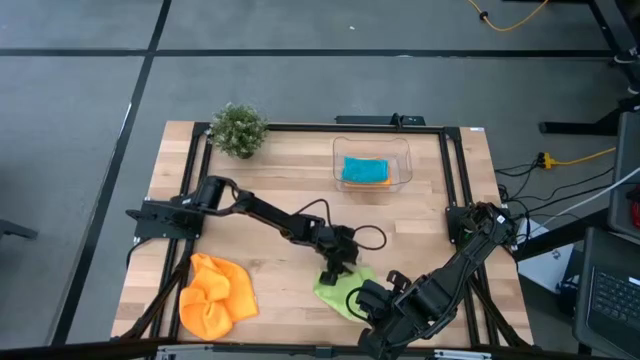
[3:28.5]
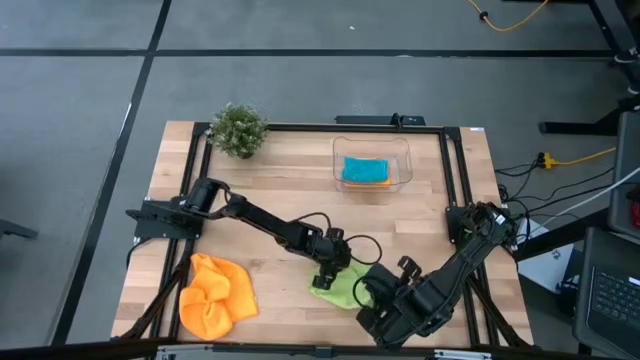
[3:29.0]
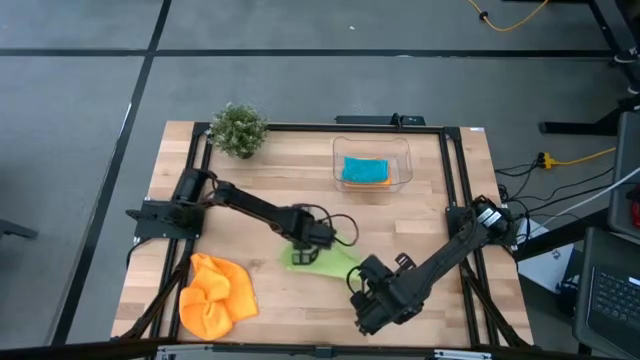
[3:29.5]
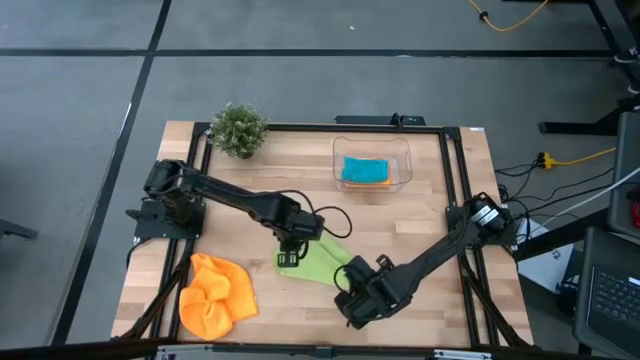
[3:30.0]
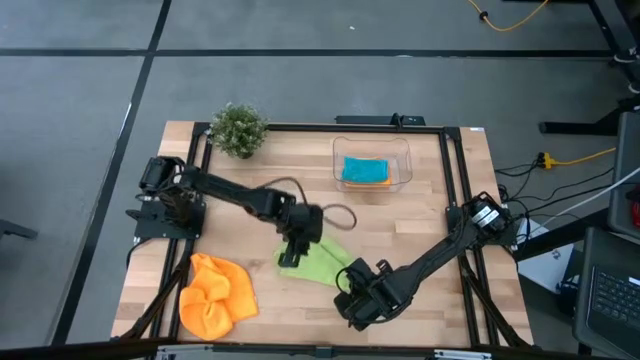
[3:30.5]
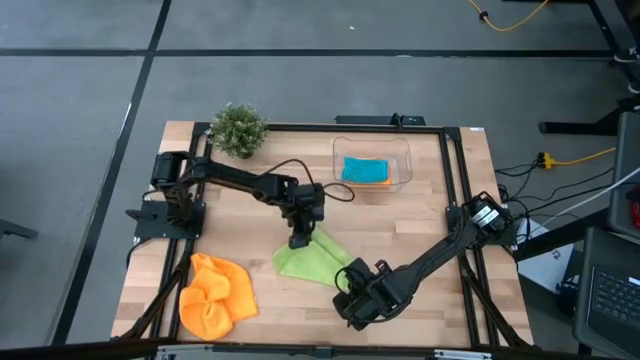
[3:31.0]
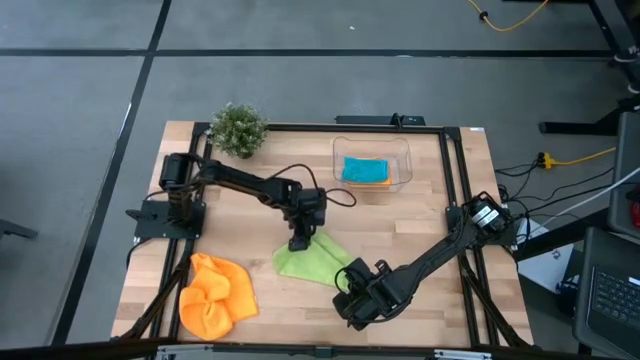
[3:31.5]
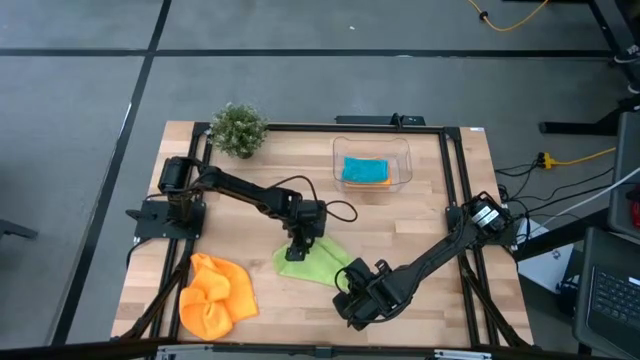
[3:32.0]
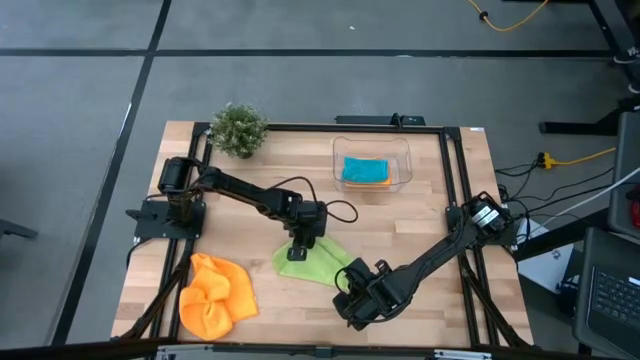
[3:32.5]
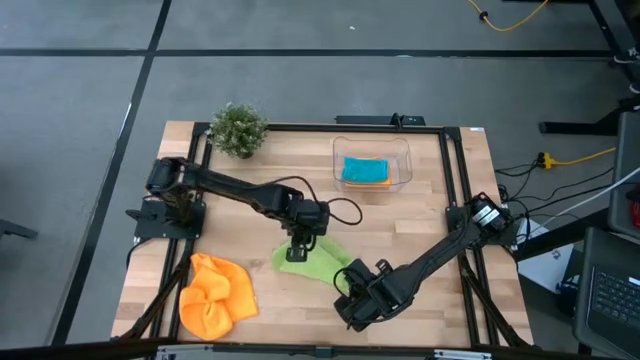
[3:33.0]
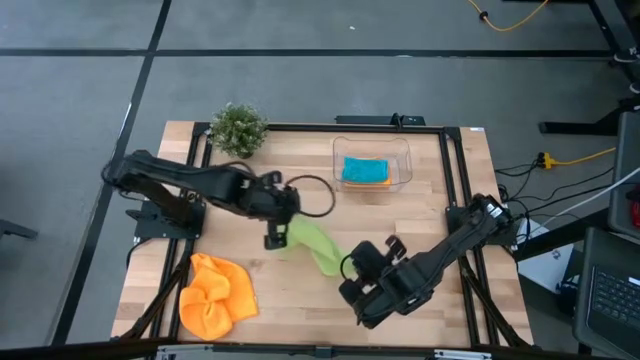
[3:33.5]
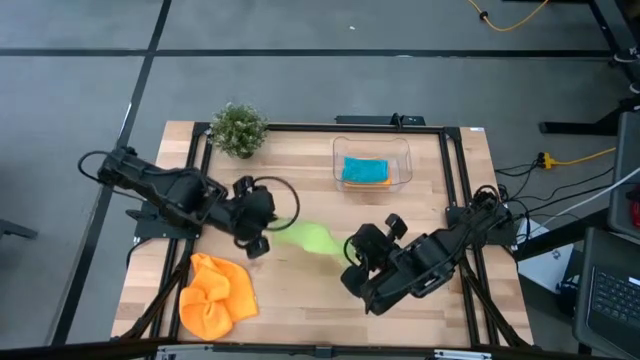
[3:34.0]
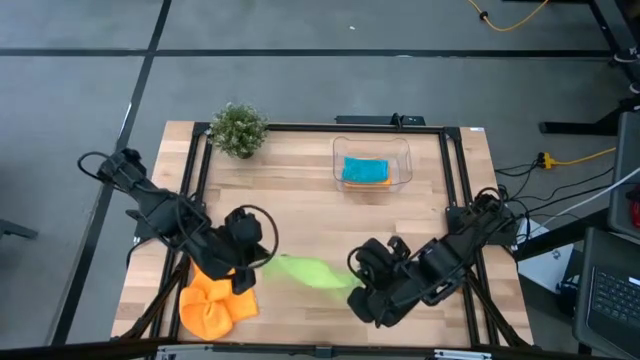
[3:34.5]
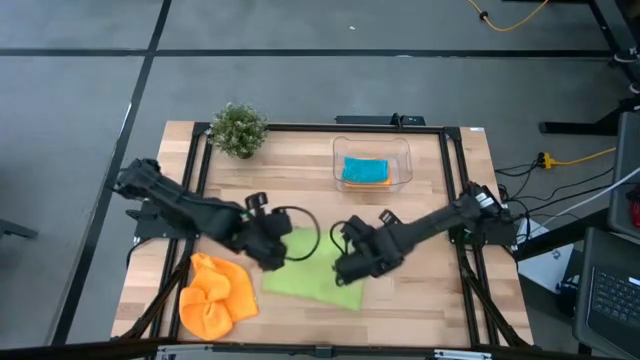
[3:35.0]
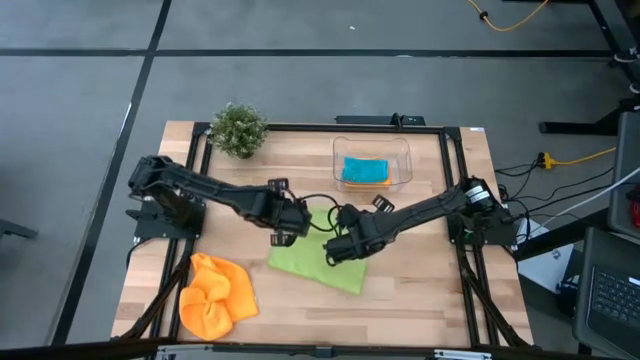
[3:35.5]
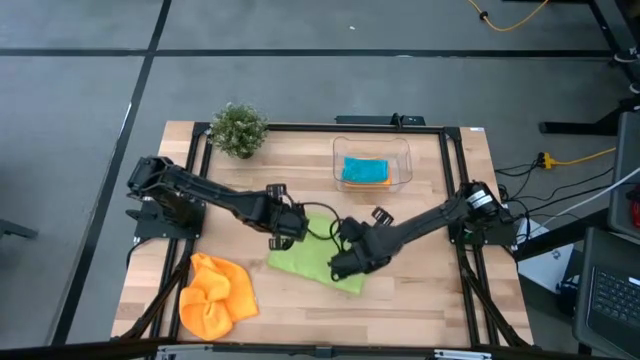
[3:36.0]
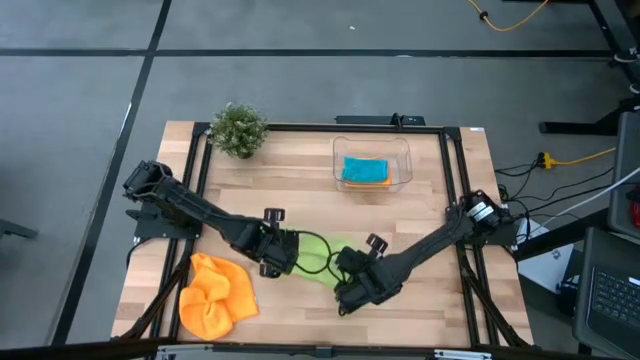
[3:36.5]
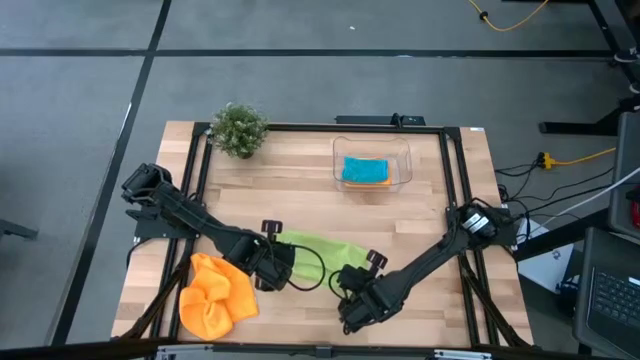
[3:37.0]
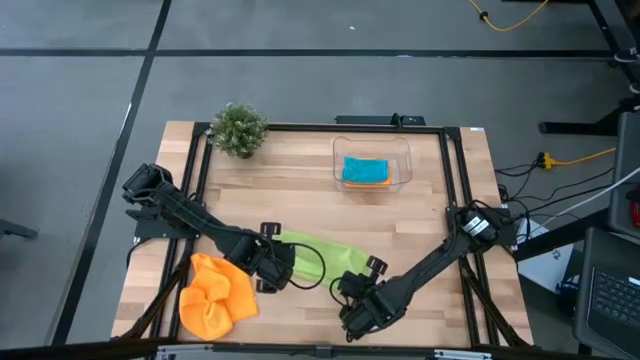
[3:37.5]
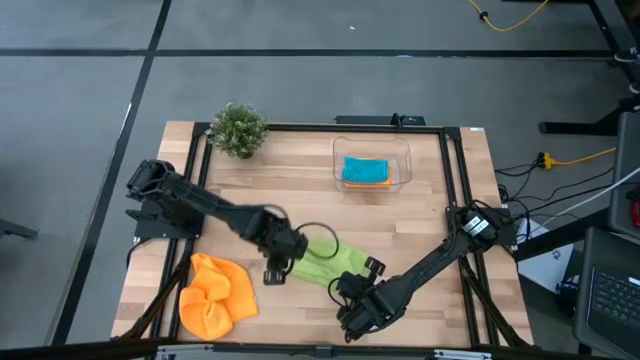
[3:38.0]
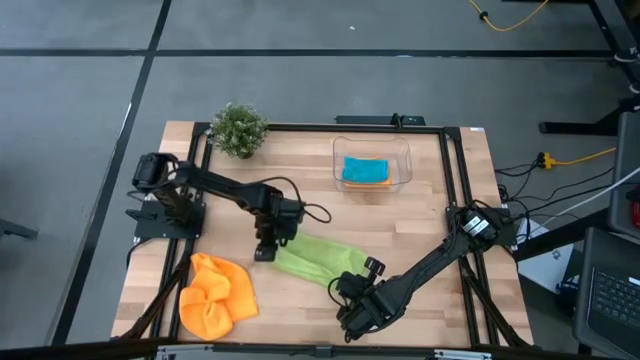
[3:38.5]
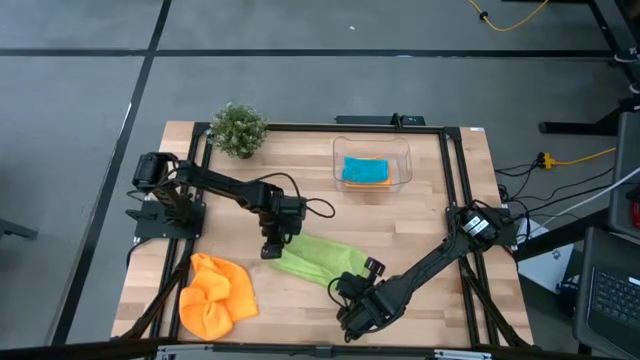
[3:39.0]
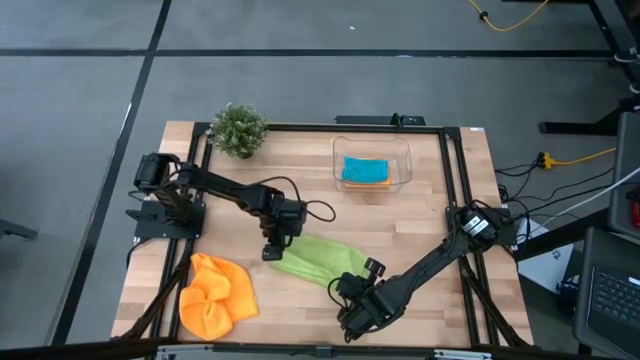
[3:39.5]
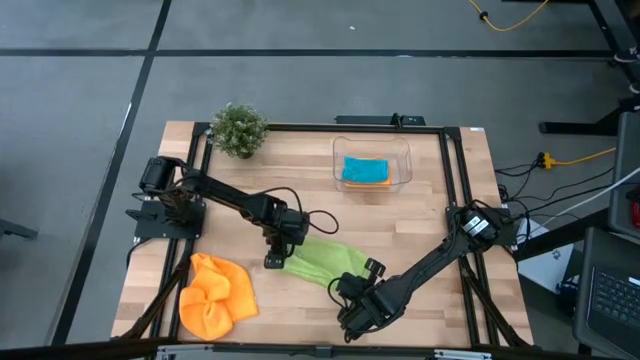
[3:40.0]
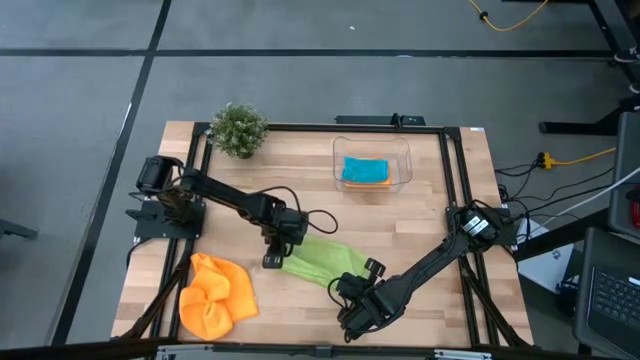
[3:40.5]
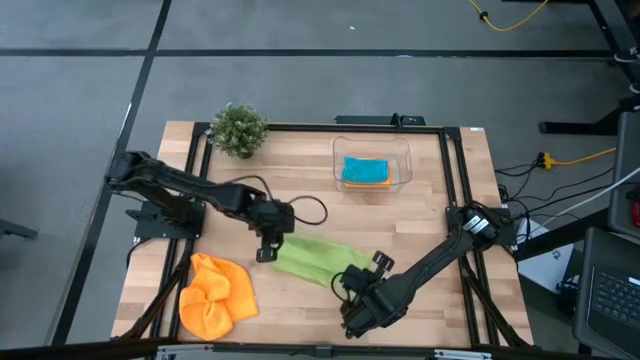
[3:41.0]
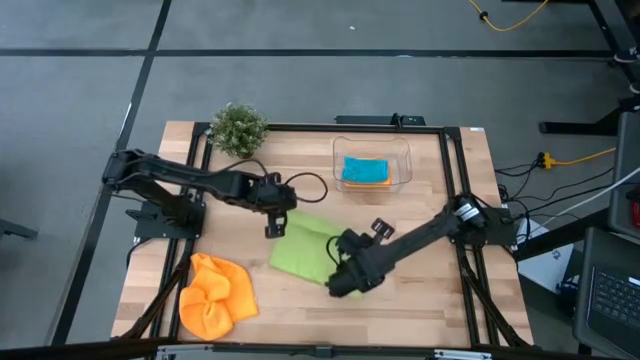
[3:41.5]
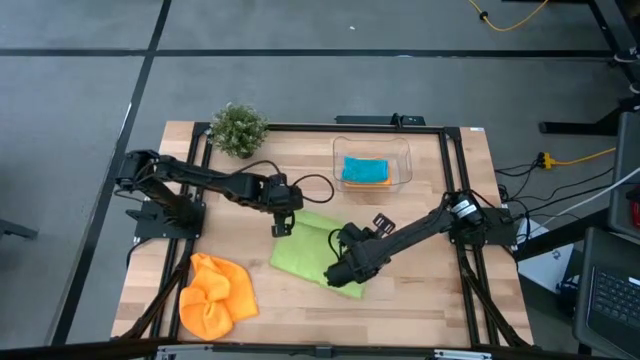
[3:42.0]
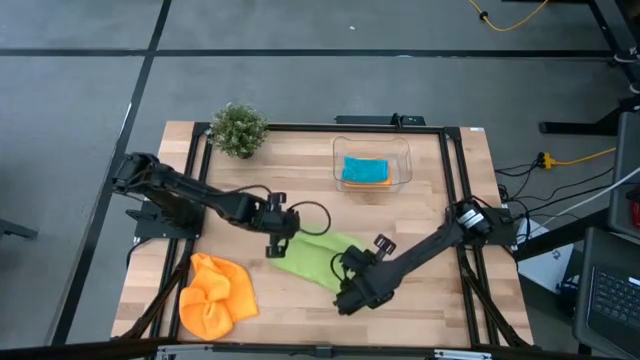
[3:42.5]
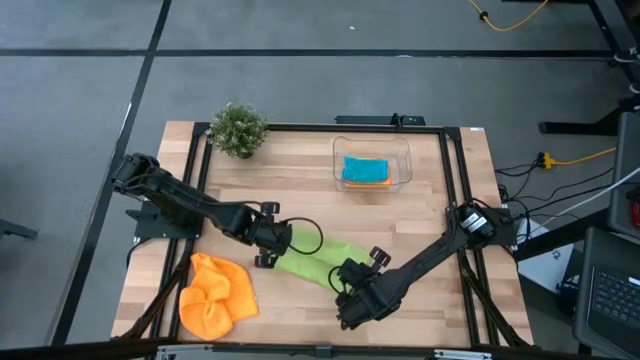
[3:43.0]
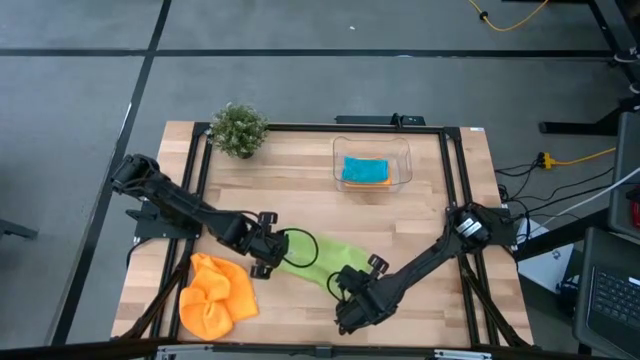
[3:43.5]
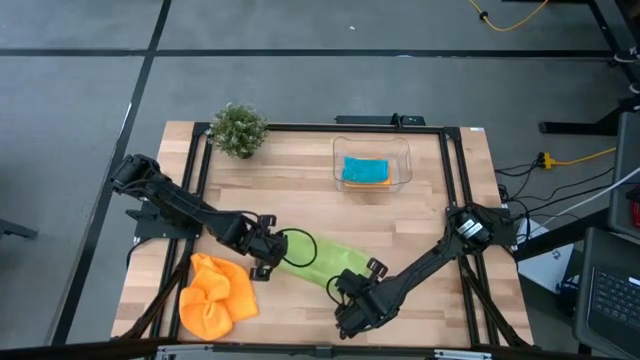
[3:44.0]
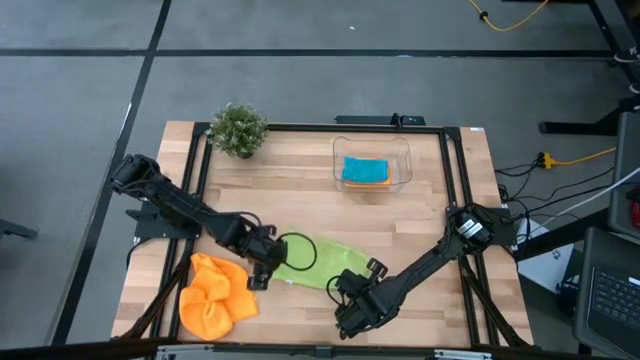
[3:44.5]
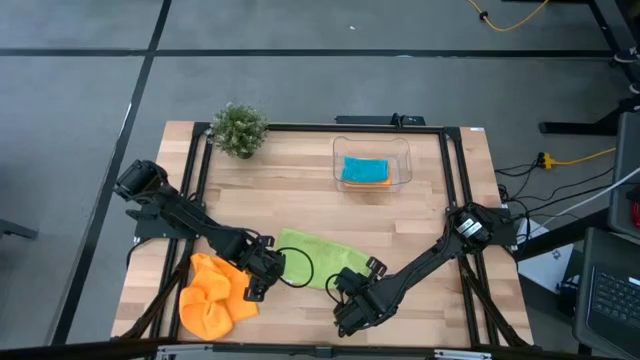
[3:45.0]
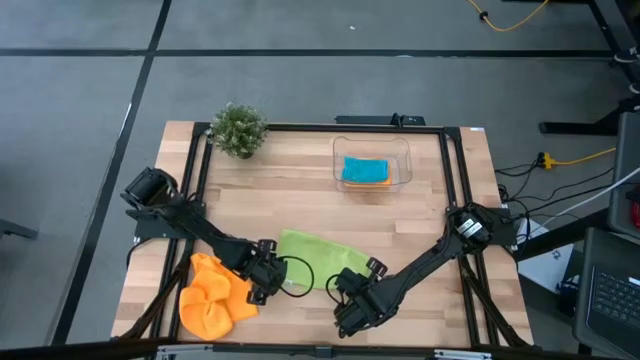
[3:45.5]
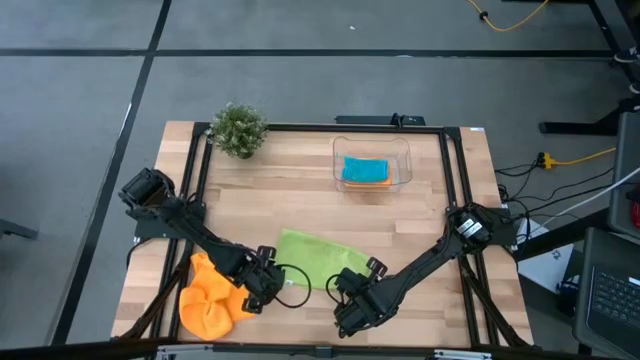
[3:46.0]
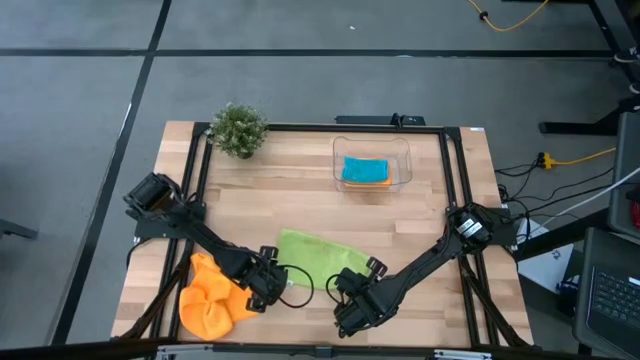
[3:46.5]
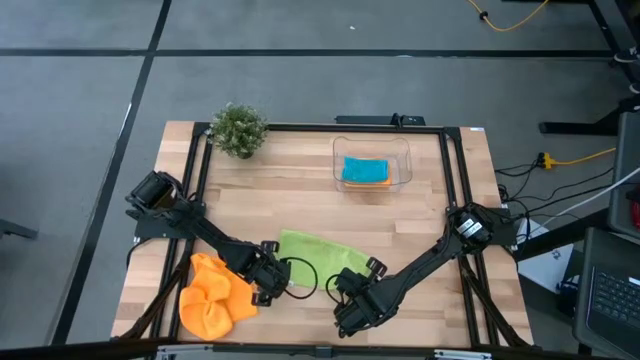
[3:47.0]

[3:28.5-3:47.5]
Task: Fold microfiber towels
Fold the green microfiber cloth
